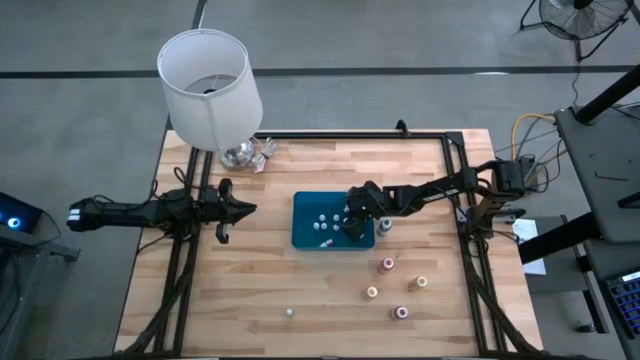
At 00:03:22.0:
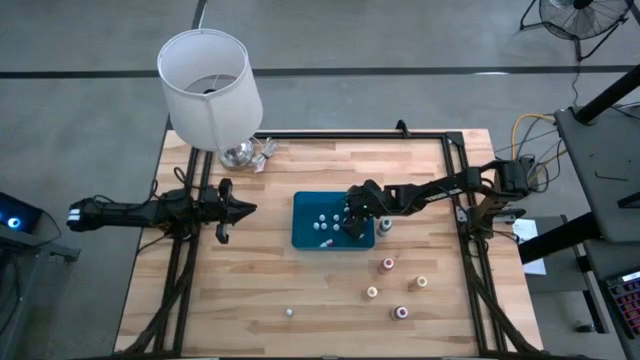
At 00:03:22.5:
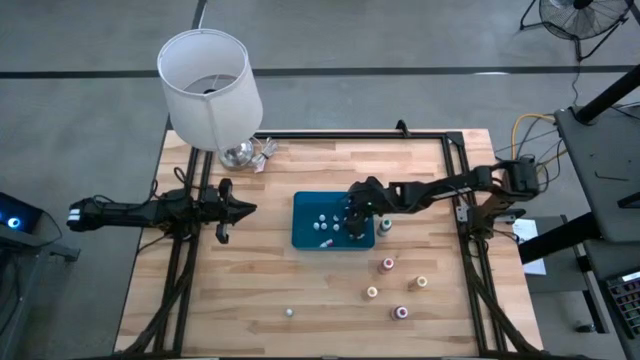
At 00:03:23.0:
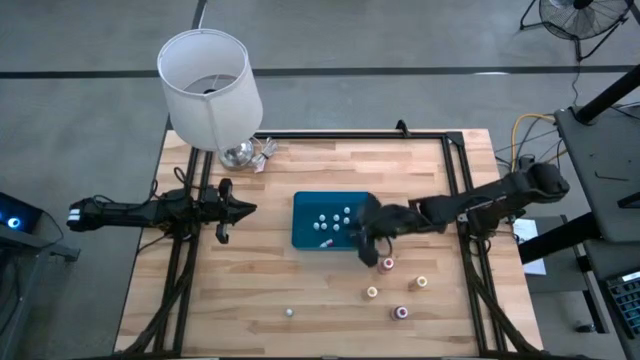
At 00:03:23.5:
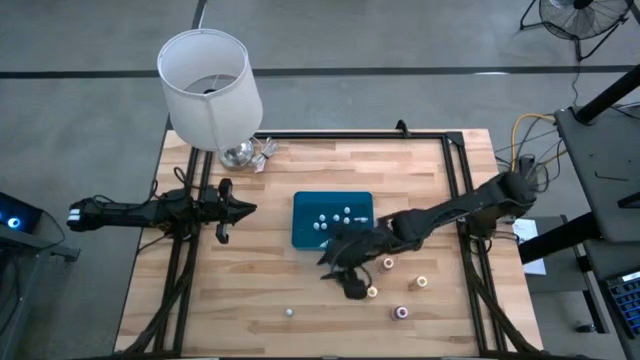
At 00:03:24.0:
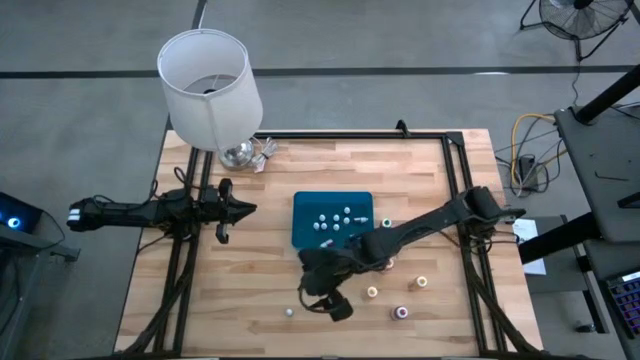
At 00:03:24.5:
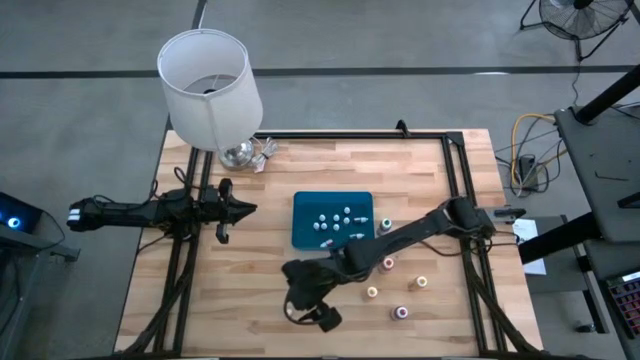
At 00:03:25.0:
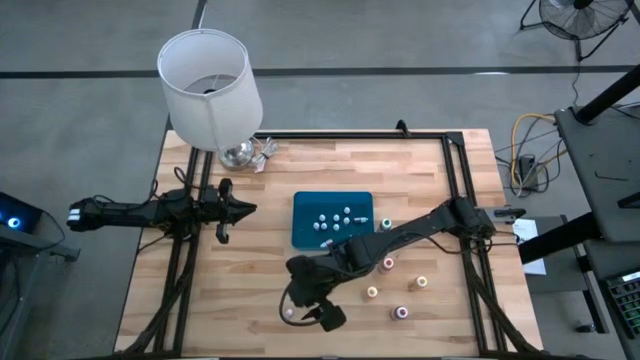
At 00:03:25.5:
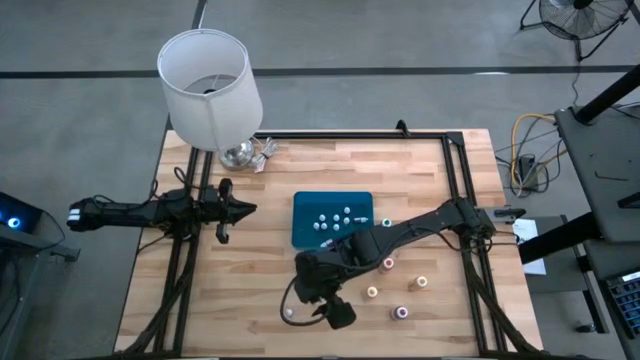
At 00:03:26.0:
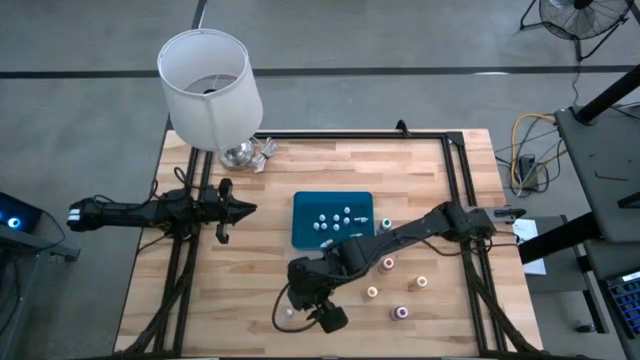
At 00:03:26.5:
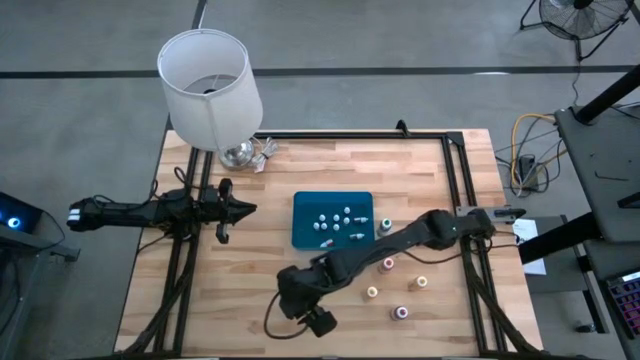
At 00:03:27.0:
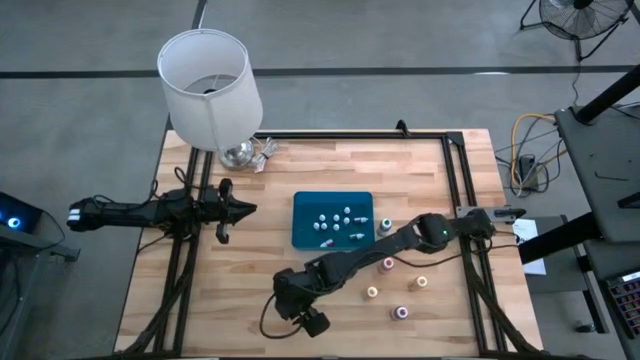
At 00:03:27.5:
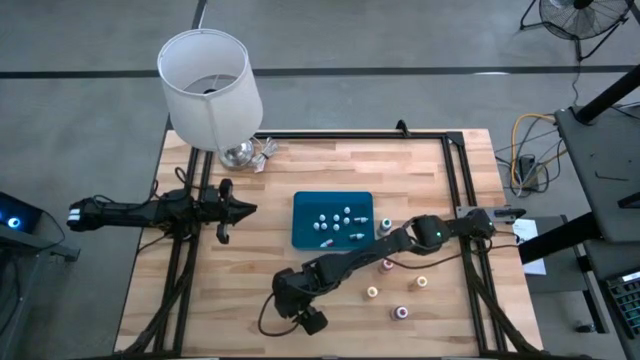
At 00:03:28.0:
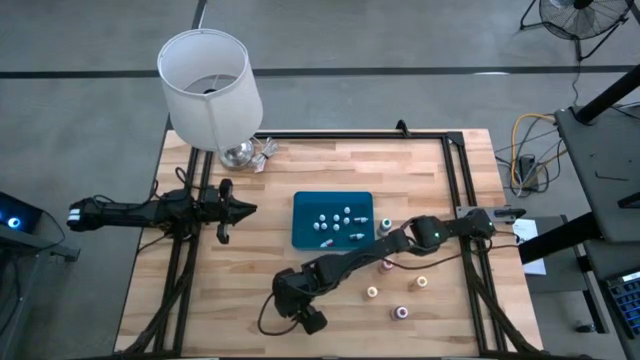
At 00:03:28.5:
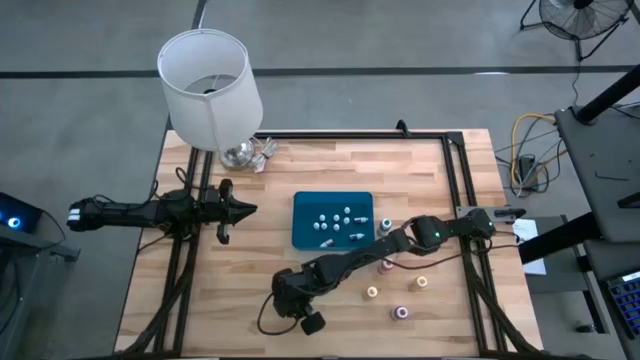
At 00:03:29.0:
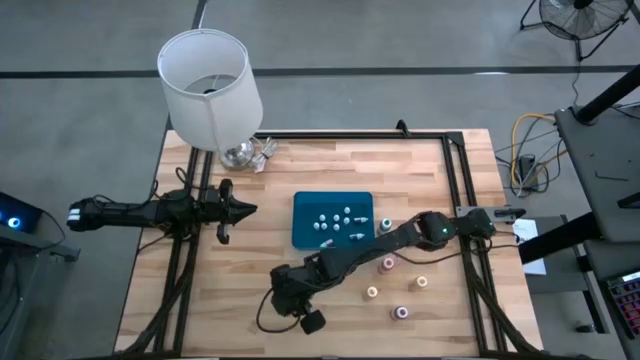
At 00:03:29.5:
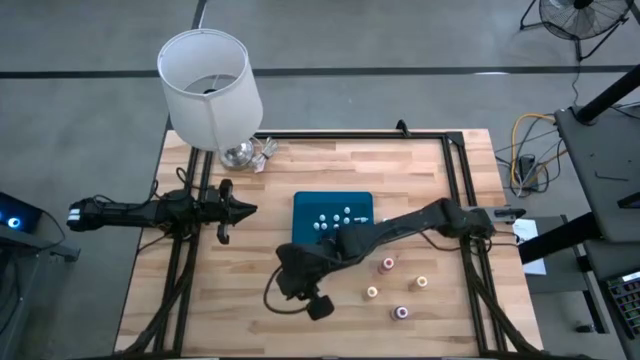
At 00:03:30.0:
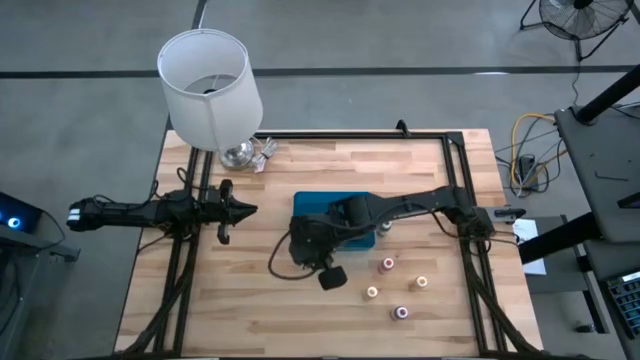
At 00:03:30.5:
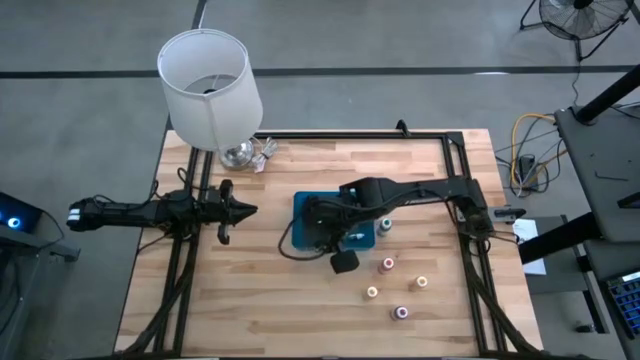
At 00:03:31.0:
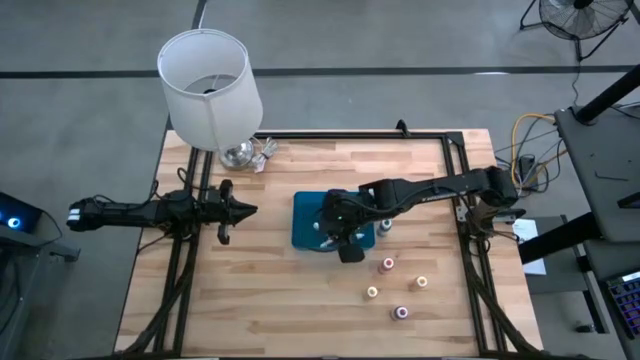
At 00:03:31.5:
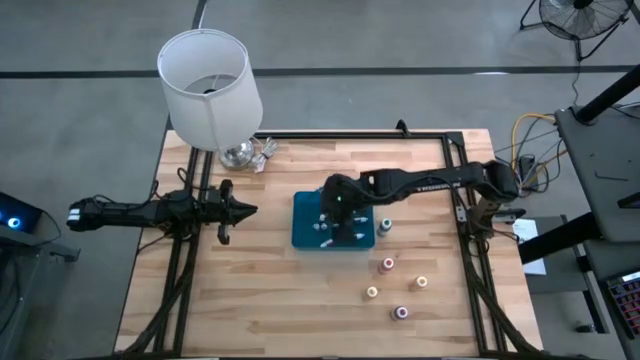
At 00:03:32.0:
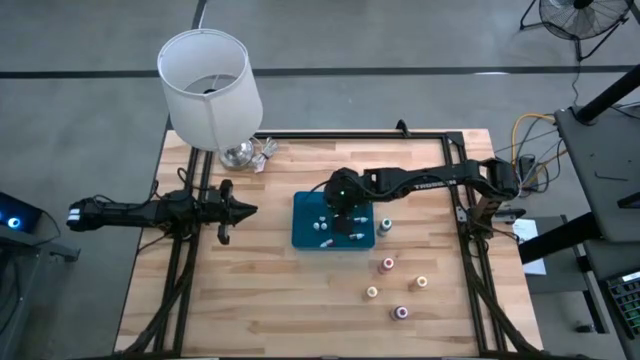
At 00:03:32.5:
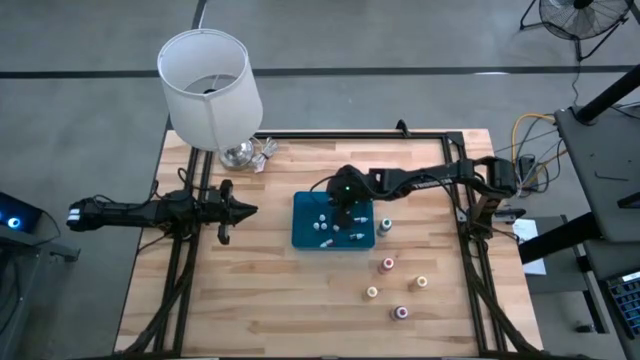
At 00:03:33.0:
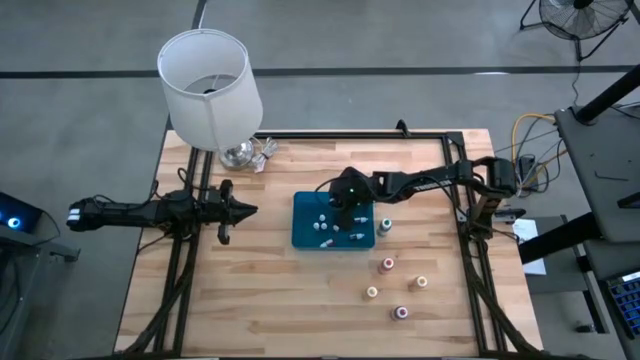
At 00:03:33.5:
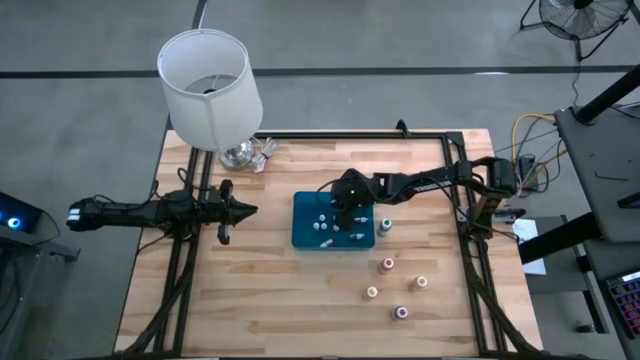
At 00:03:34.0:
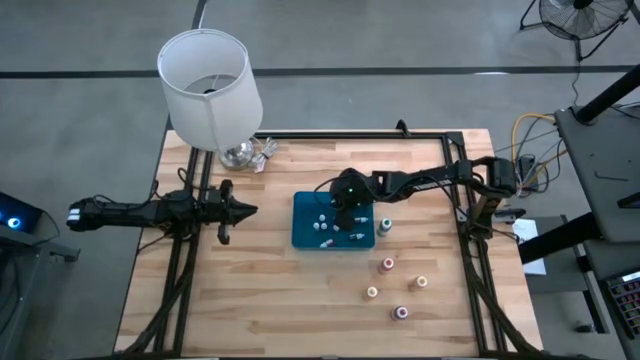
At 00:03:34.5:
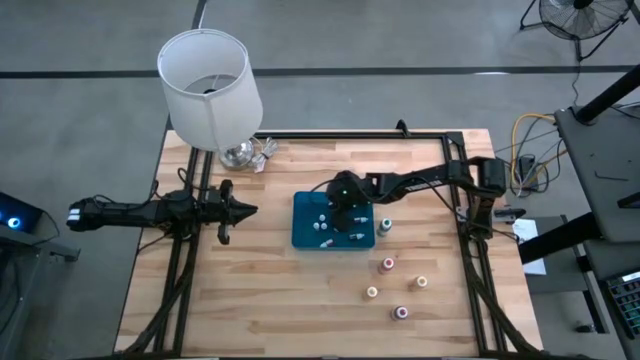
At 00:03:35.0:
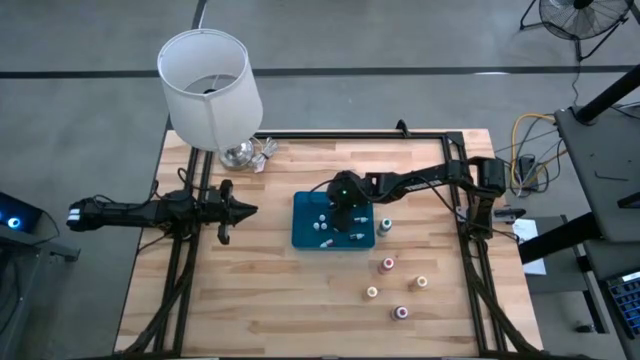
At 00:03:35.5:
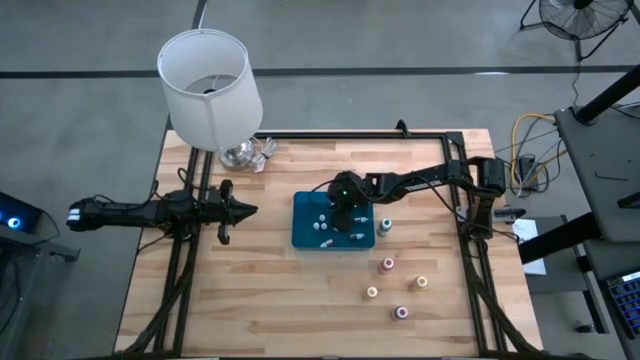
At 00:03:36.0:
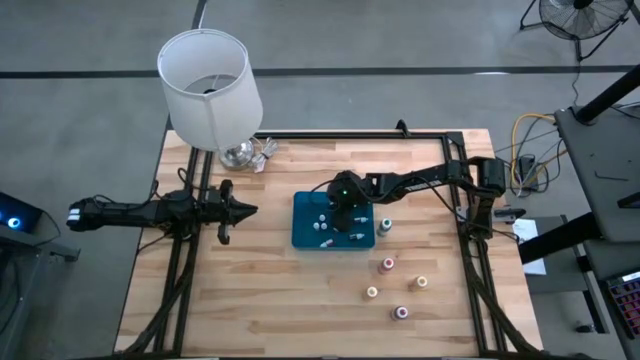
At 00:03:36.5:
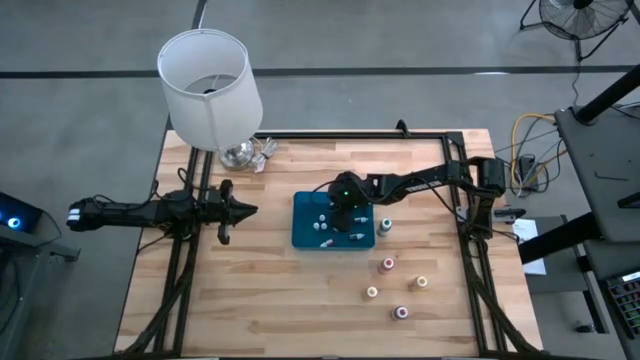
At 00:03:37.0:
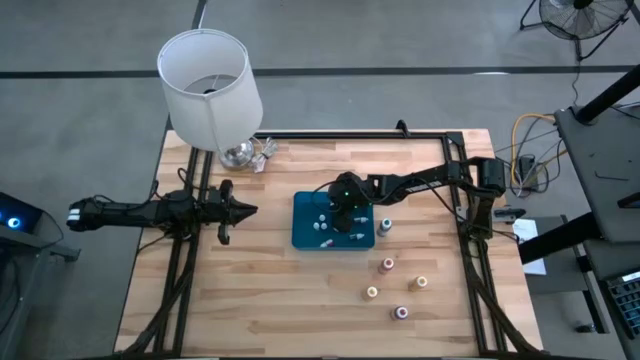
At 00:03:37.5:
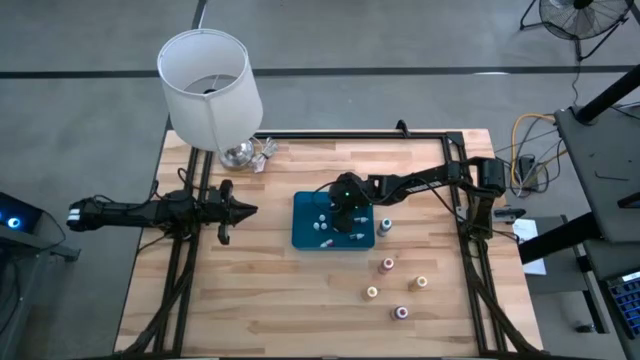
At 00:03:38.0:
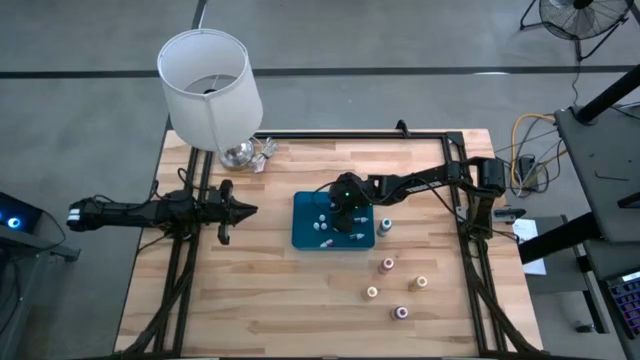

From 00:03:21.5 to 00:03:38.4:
Task: Pick & Place food coloring
Put the small blue food coloring bottle into the blue bin

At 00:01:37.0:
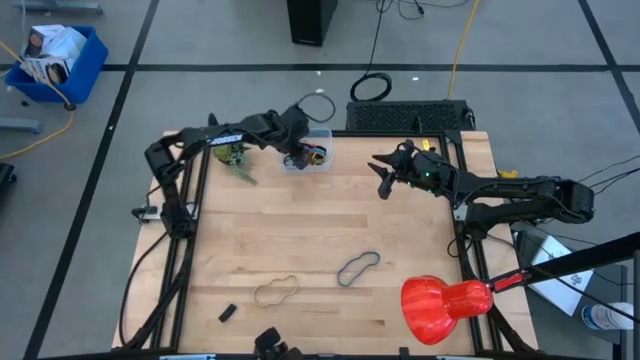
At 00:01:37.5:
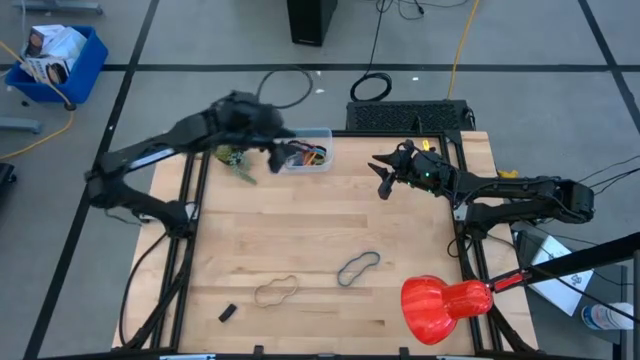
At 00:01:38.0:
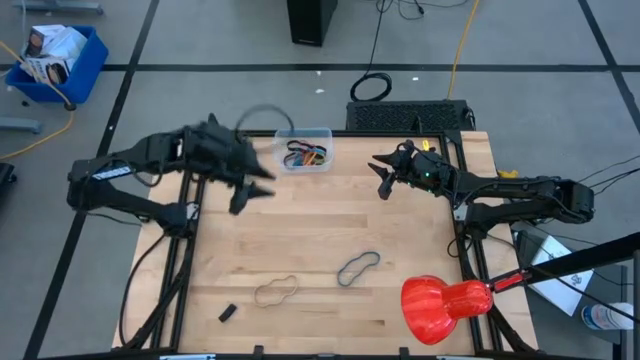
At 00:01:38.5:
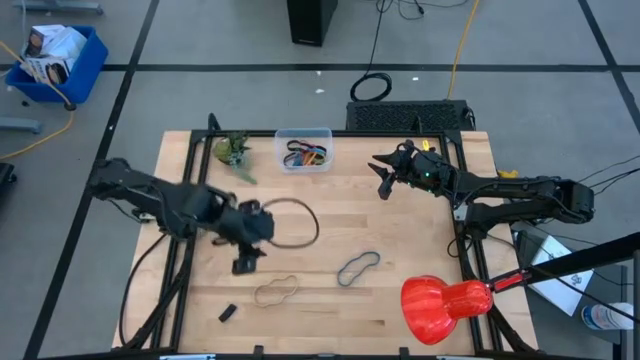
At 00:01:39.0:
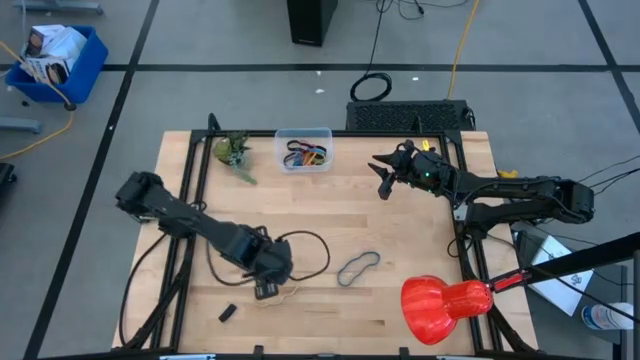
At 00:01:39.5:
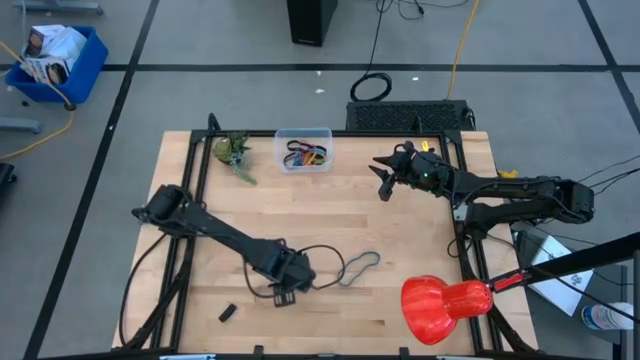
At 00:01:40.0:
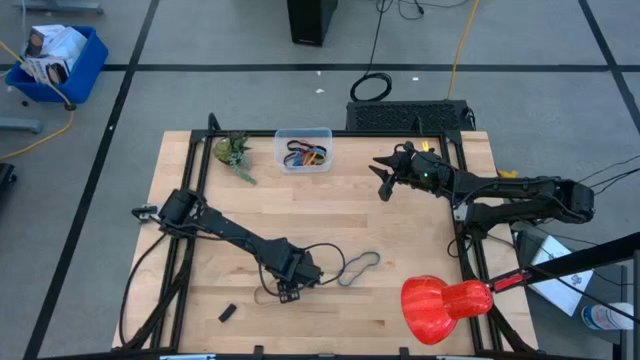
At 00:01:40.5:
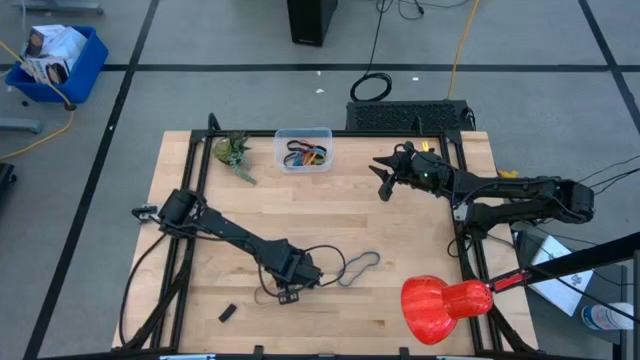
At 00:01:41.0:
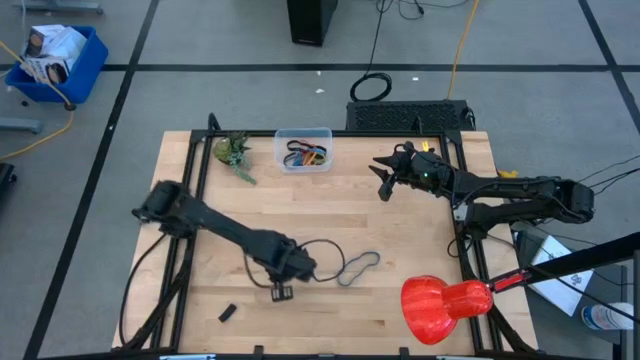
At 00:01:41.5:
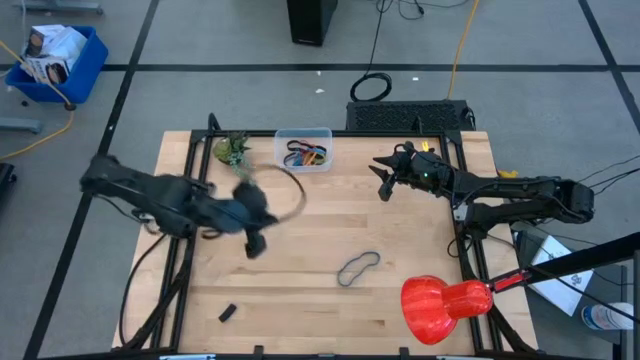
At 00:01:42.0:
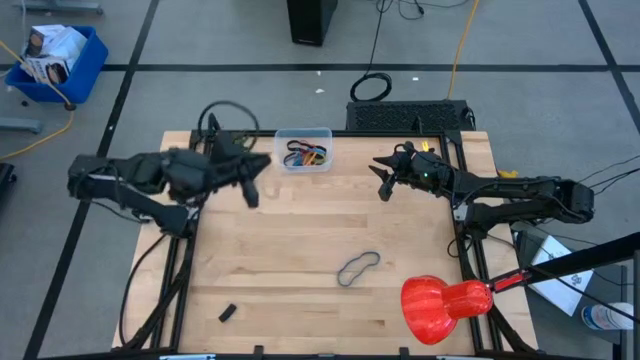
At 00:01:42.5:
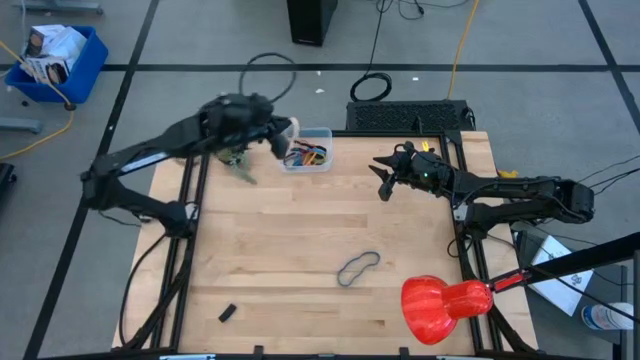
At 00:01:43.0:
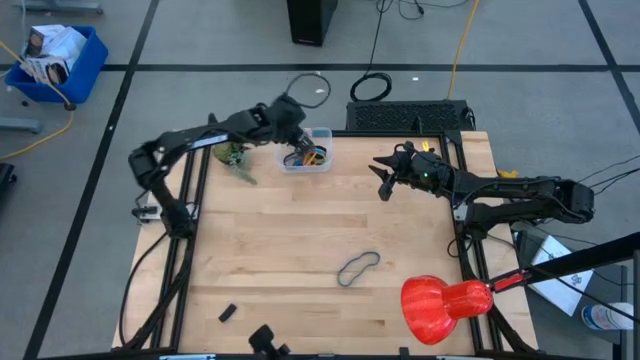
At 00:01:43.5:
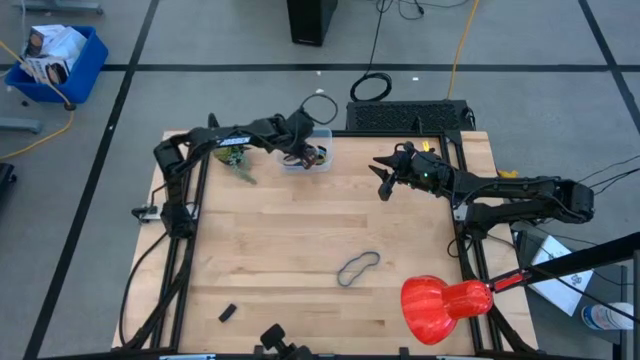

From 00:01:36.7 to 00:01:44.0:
Task: Pick and place rubber bands into bin
Put the brown rubber band into the transparent bin
